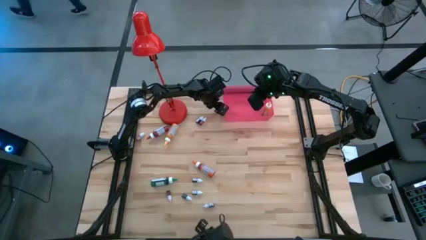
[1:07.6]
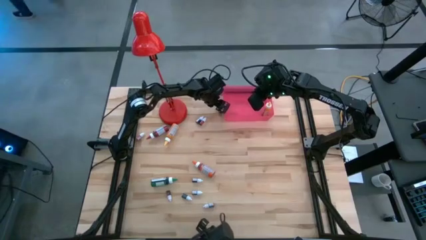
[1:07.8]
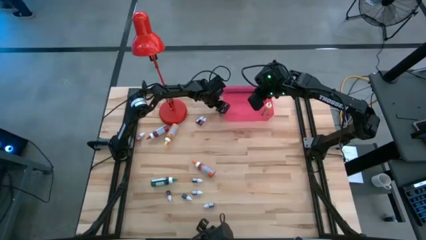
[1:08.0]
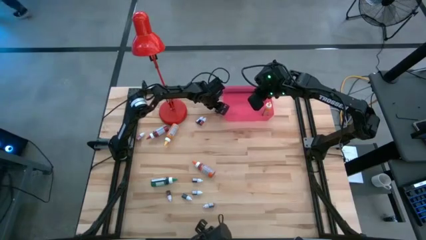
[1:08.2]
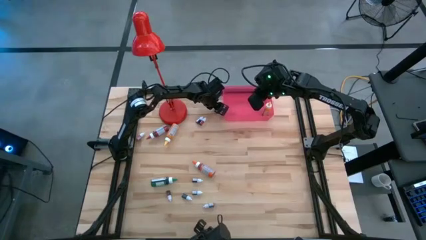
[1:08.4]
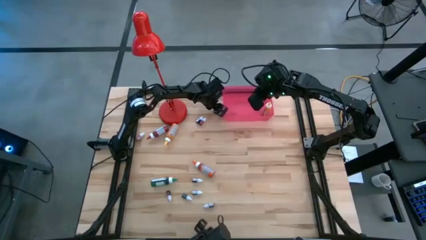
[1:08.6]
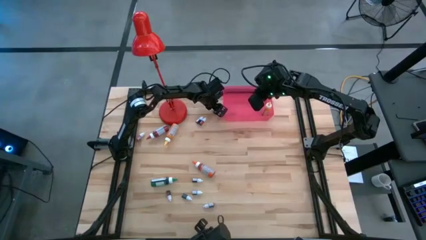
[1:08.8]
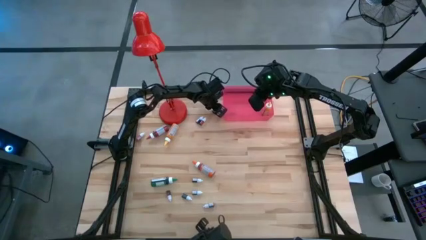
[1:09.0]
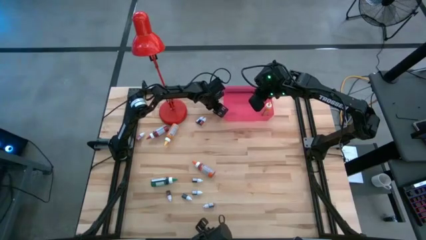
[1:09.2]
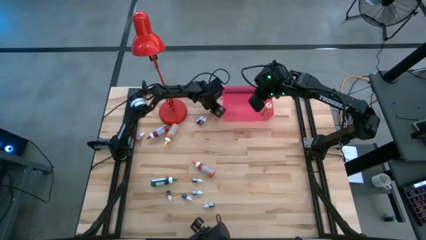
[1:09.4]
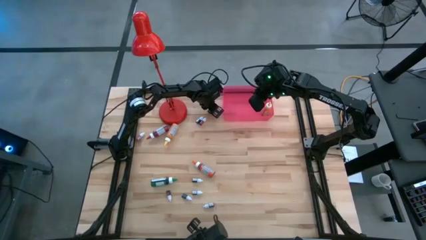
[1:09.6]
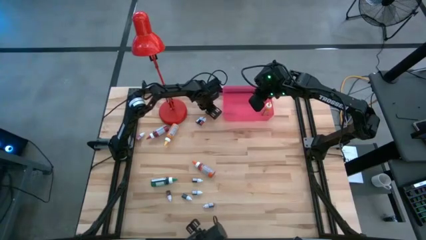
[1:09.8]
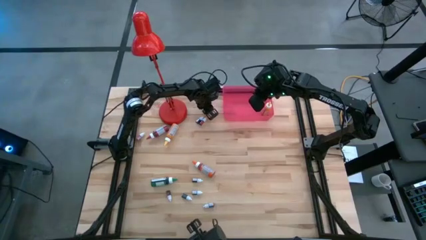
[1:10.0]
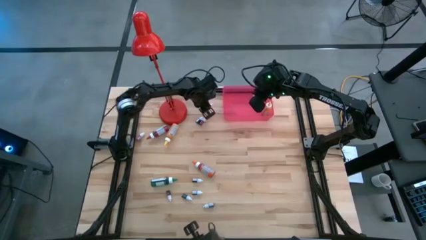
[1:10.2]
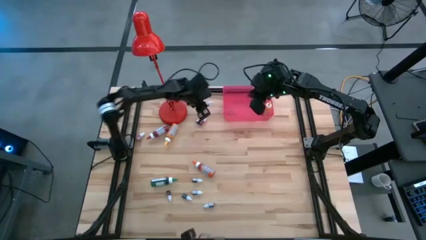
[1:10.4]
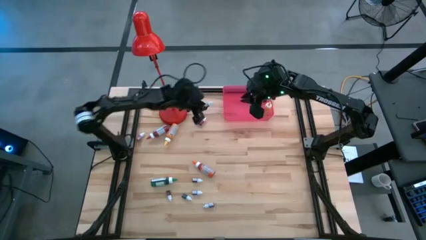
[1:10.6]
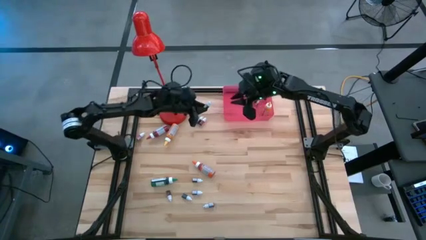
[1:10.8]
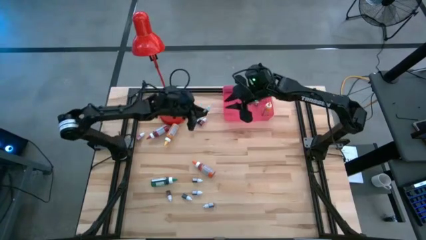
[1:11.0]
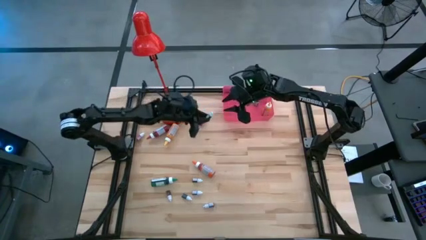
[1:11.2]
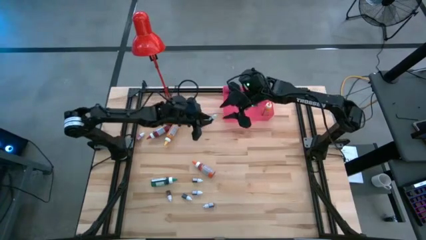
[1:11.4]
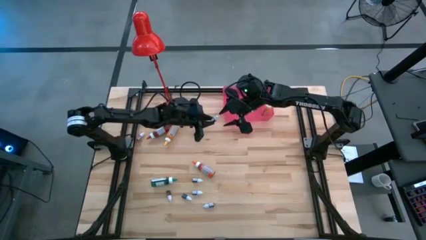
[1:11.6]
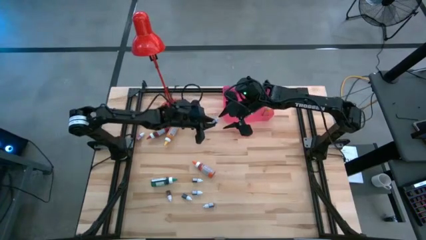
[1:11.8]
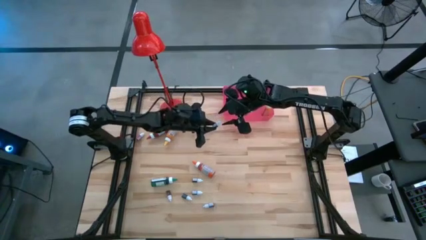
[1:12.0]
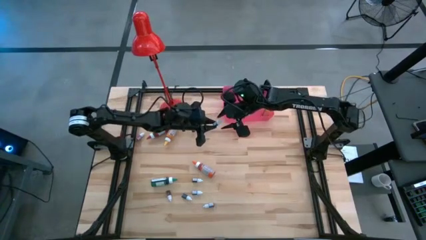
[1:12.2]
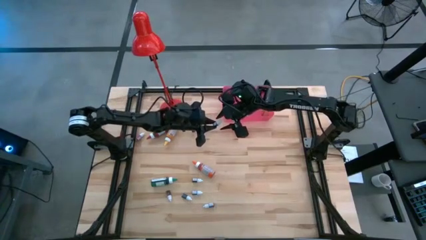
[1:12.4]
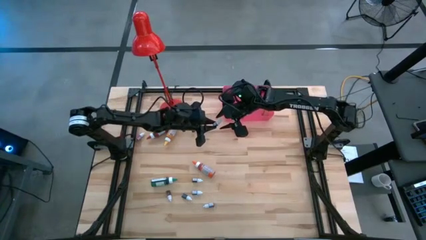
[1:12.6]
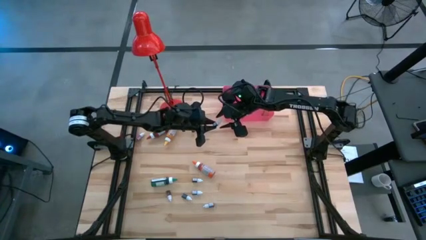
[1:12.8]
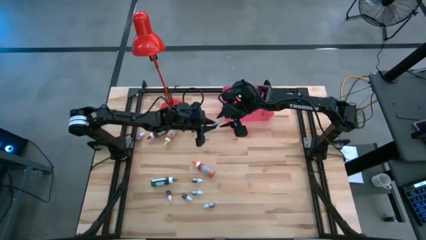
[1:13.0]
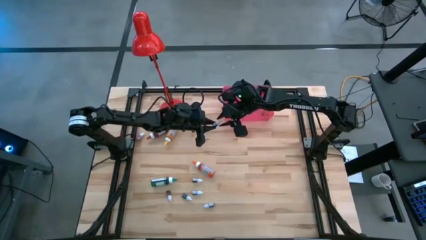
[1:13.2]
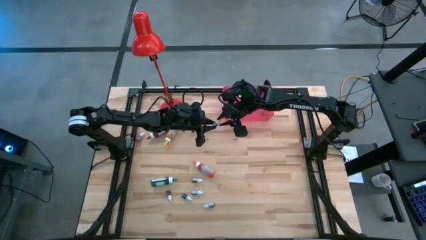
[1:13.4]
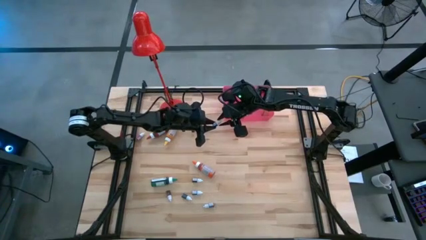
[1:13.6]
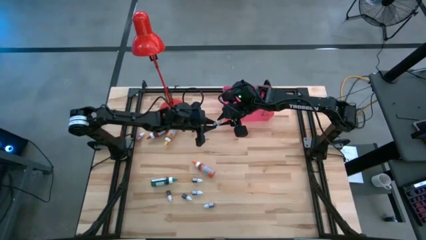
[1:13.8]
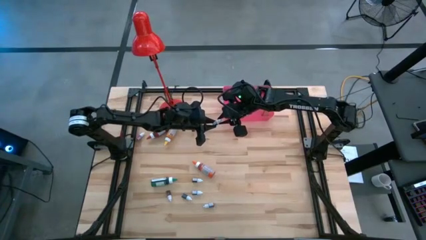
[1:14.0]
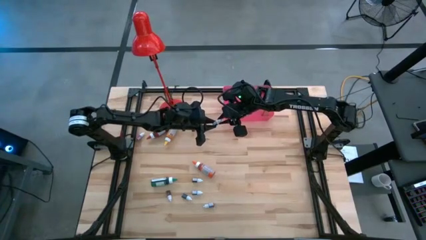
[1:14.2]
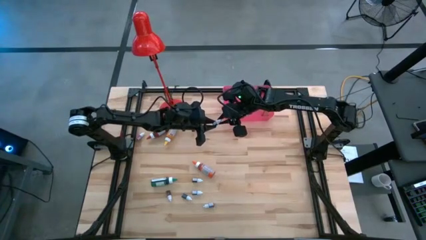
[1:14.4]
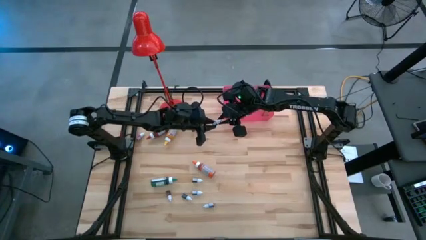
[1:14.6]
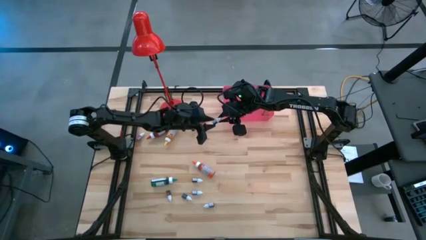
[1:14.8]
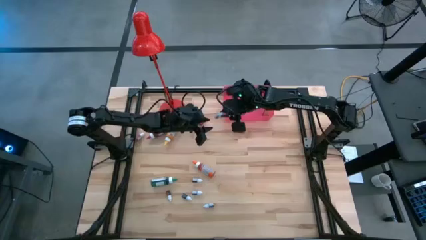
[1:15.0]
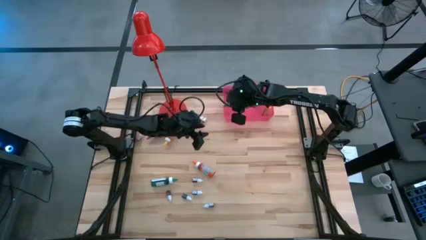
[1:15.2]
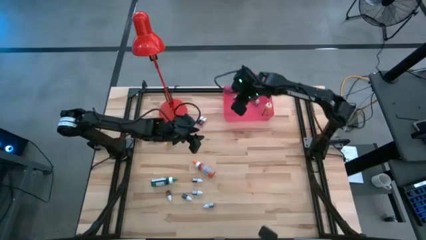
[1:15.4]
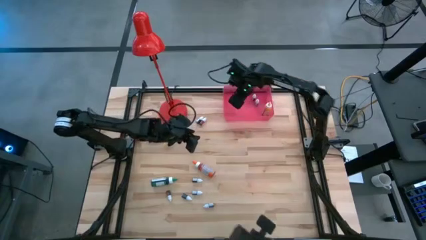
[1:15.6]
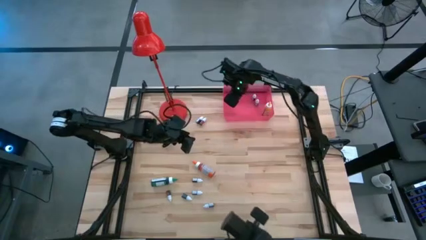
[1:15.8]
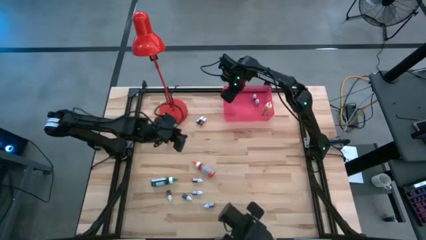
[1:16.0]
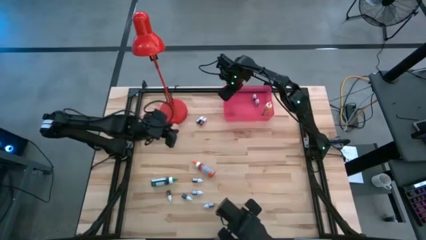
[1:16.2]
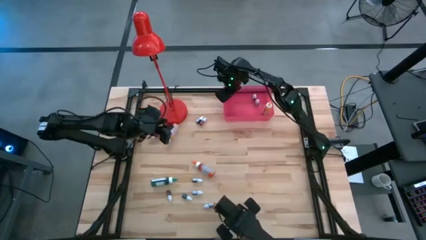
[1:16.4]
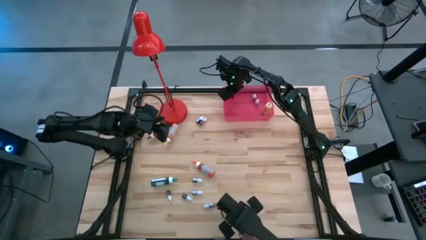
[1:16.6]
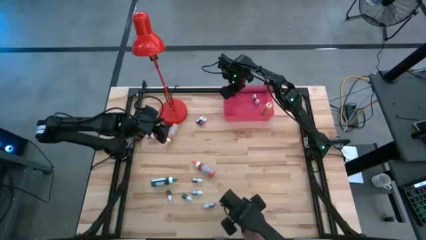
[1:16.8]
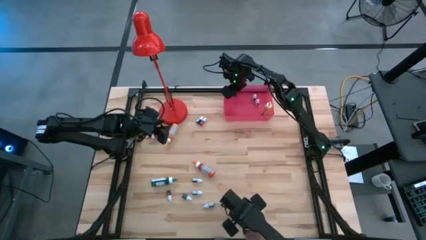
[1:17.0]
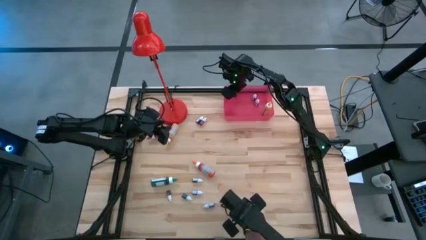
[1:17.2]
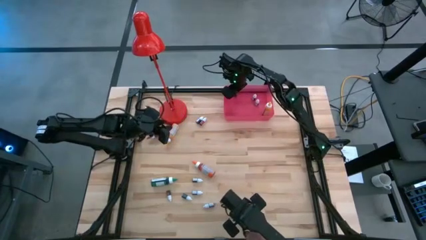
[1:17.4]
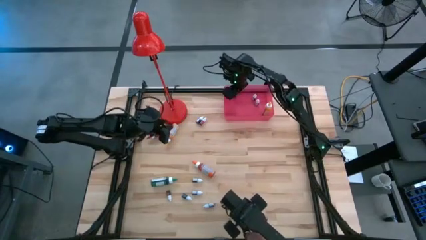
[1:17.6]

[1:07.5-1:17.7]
Task: Pick & Place food coloring
Put the small green food coloring bottle into the red bin

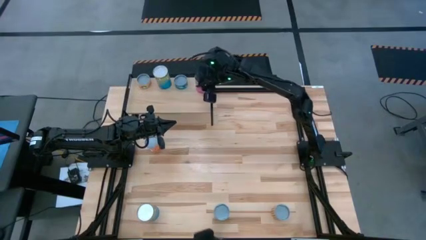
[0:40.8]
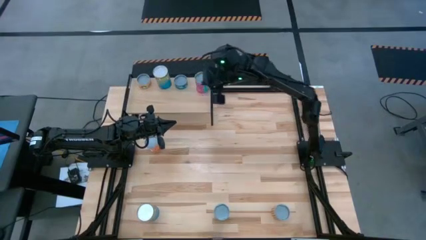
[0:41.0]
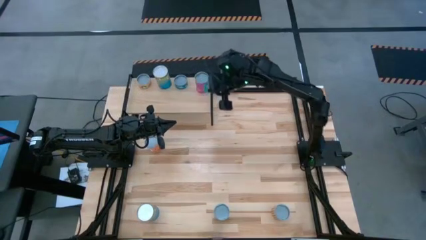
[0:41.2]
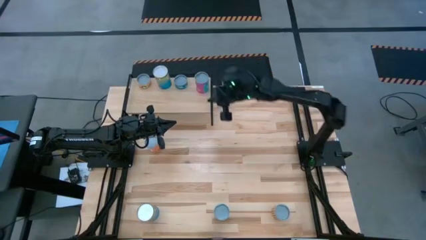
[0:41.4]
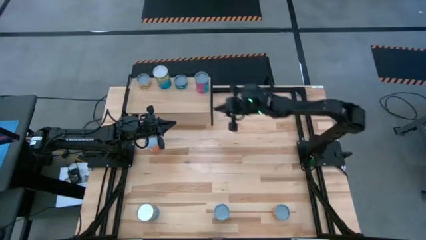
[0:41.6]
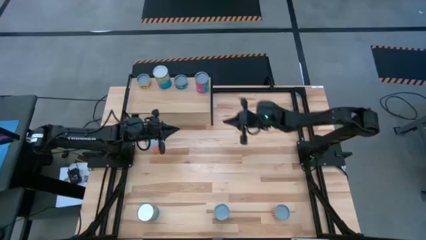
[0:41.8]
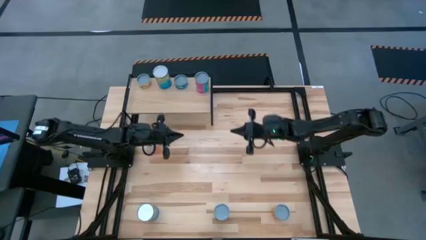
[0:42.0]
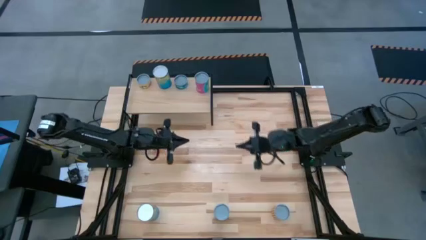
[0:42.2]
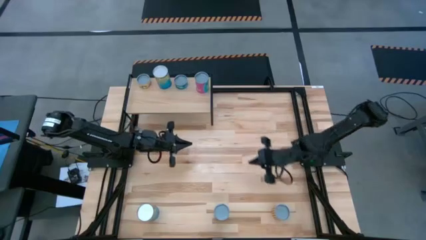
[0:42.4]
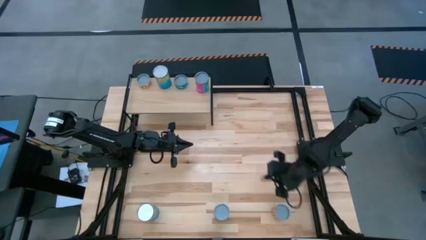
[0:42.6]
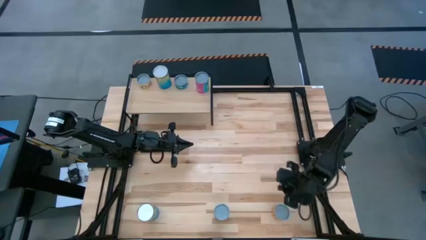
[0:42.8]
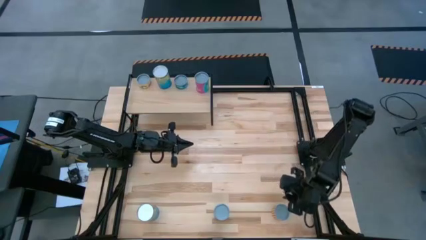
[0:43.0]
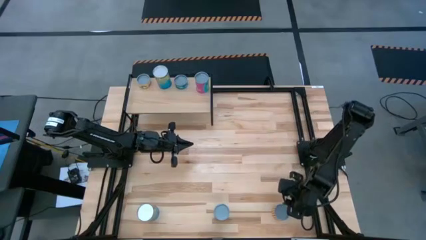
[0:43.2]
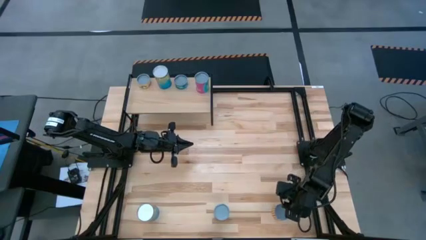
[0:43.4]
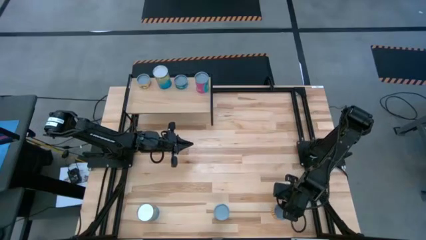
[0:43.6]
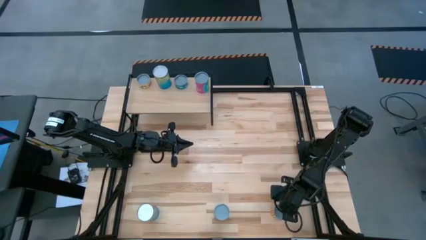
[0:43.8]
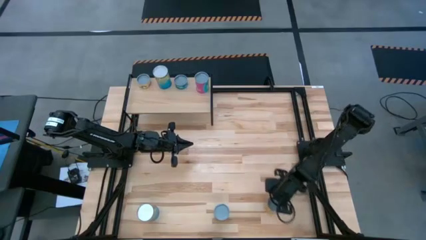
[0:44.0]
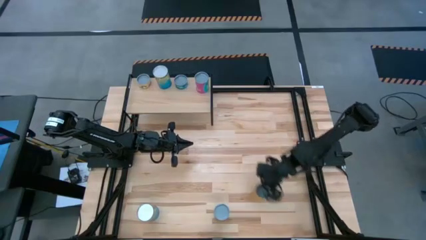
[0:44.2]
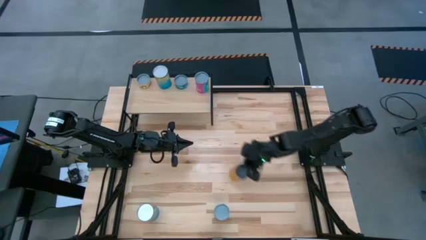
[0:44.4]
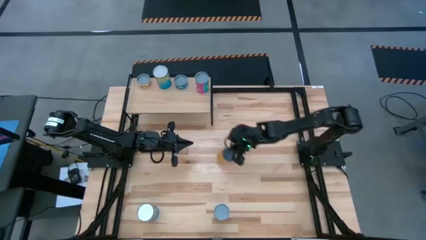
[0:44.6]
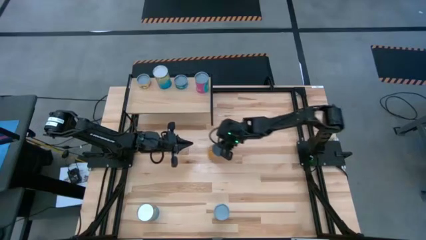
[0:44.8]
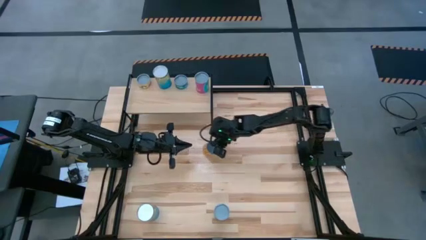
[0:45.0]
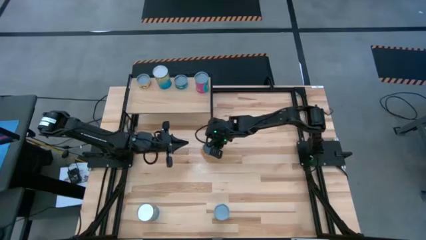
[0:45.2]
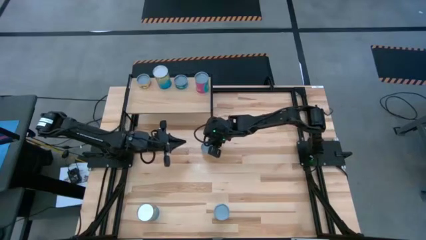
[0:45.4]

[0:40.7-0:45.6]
Task: Pick and place cans onto a shelf
Move the canned black beans to the center of the table
